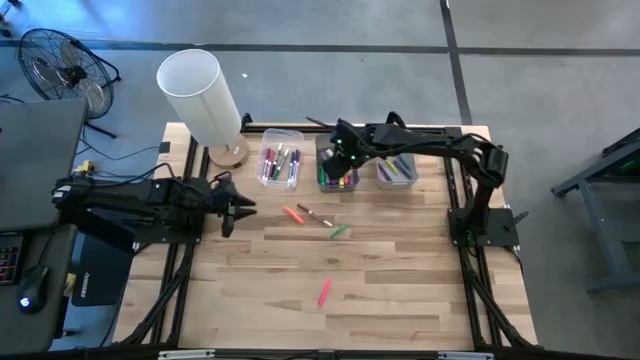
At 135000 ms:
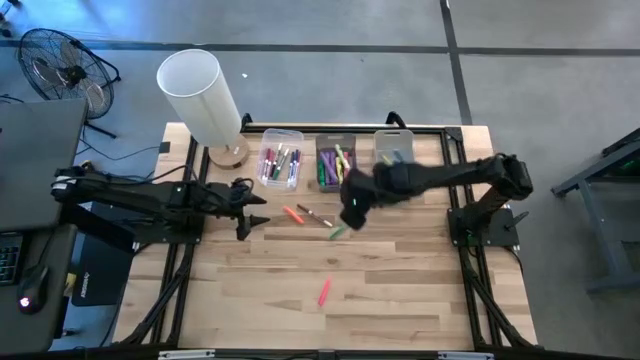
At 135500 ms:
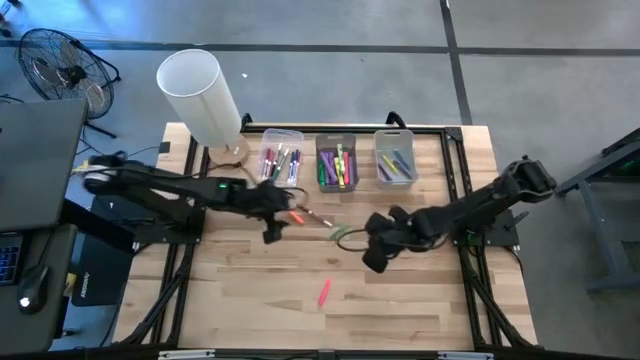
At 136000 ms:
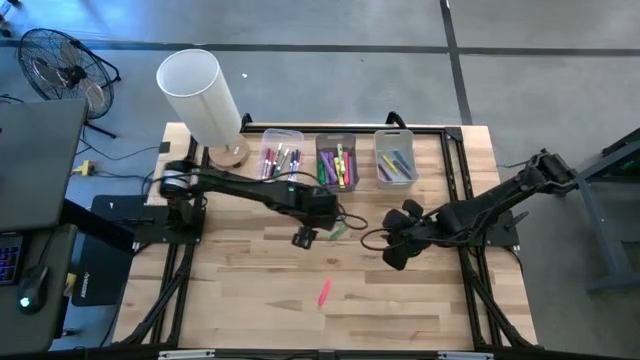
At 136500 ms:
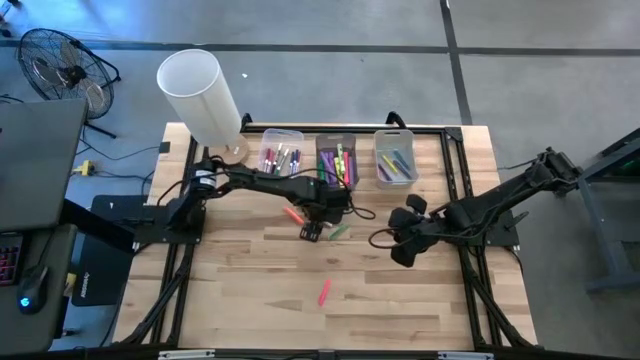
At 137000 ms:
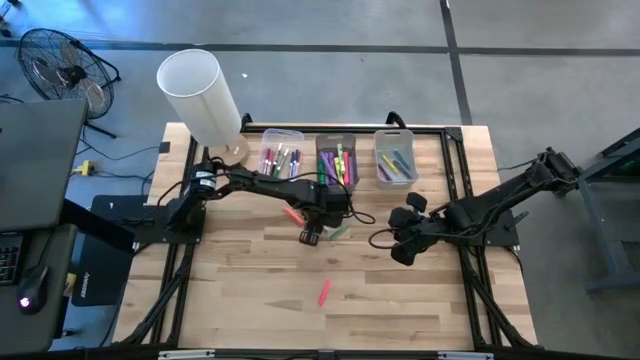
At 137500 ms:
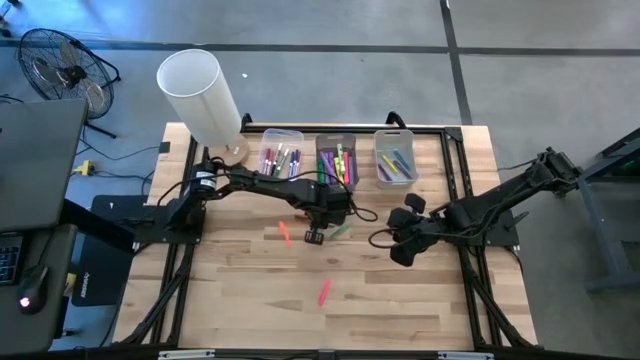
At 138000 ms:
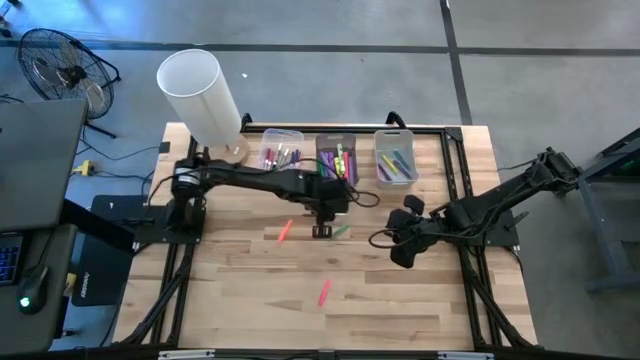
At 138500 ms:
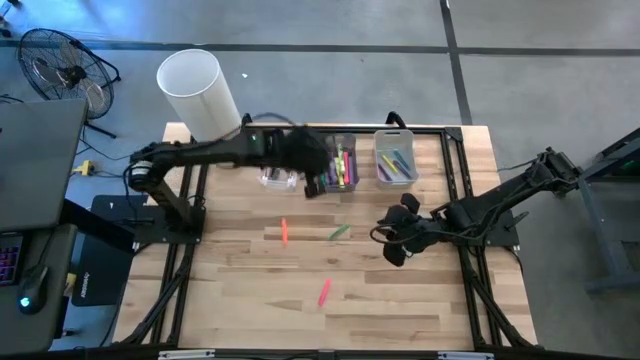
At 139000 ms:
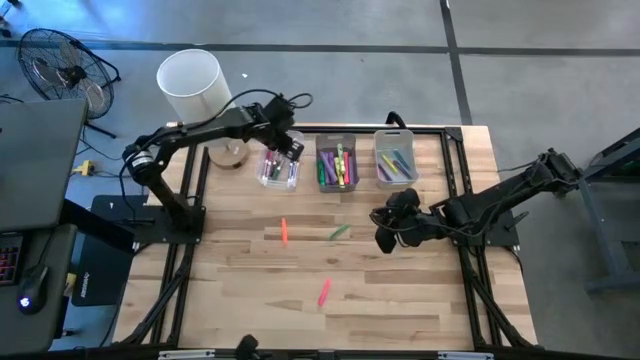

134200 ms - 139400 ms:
Task: Pick & Place Markers
Put the brown dry erase marker into the transparent bin

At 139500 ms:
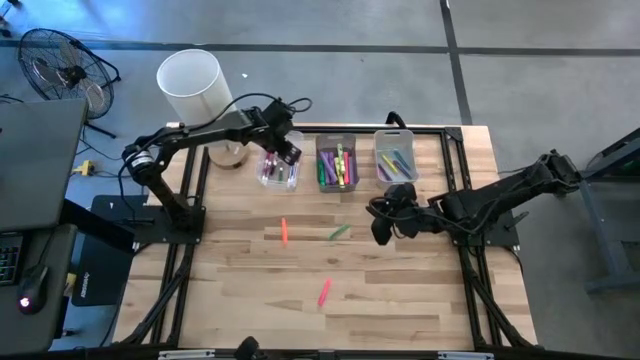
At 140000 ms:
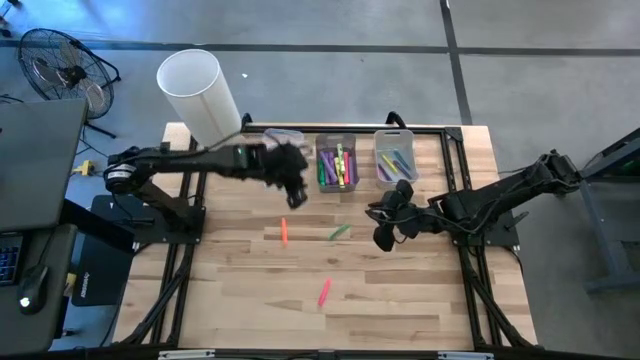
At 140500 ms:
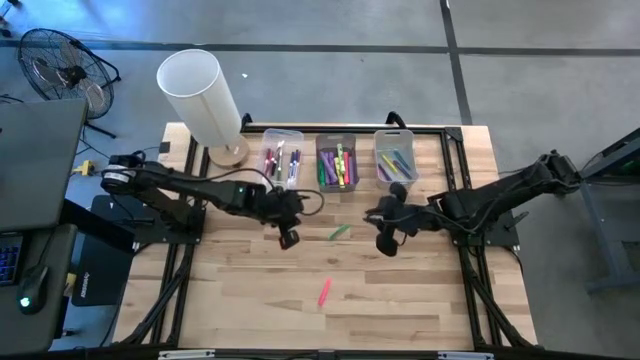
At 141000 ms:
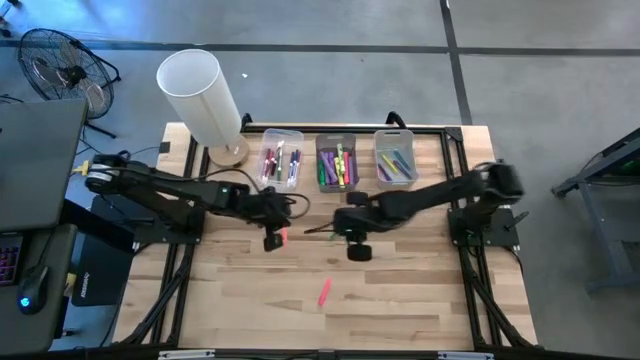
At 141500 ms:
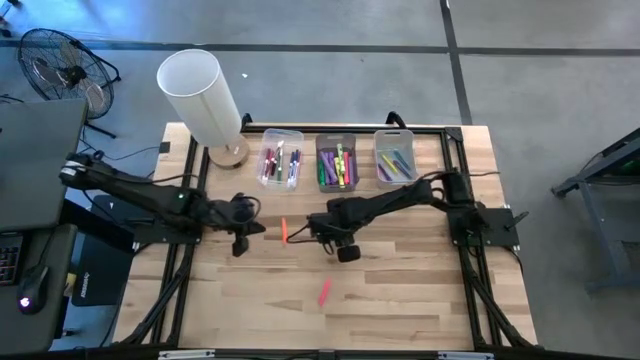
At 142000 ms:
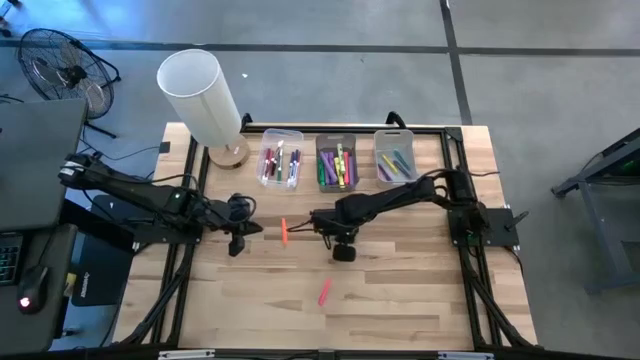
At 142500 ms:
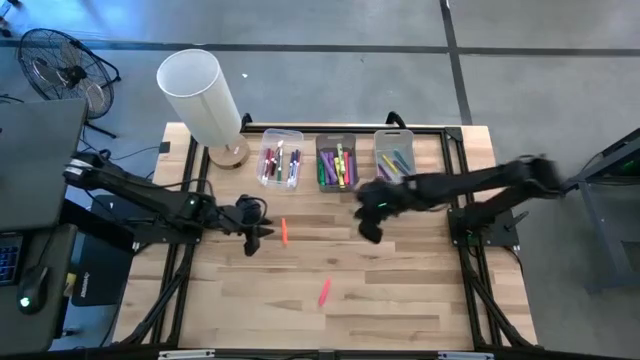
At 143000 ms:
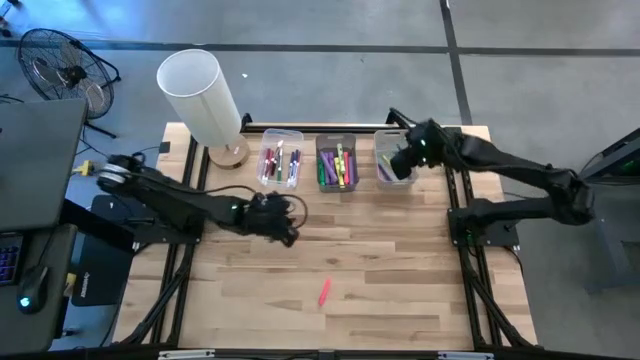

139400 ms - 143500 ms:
Put the green pen into the gray bin

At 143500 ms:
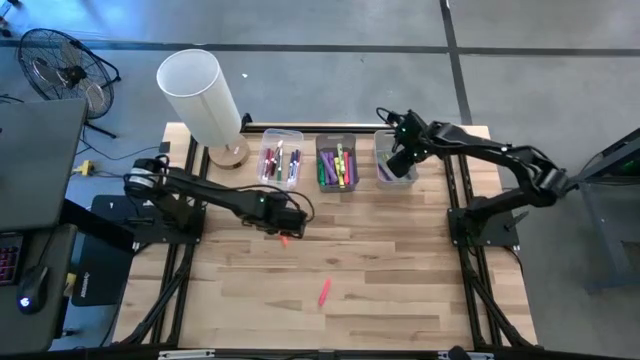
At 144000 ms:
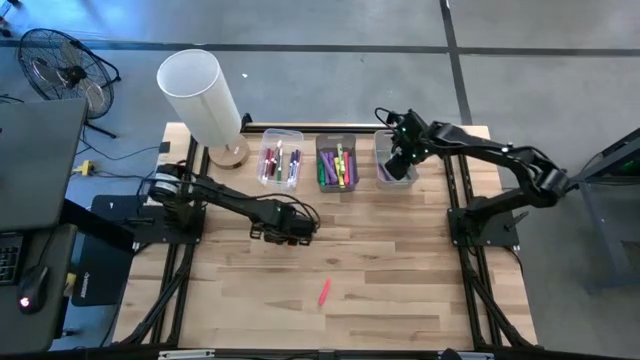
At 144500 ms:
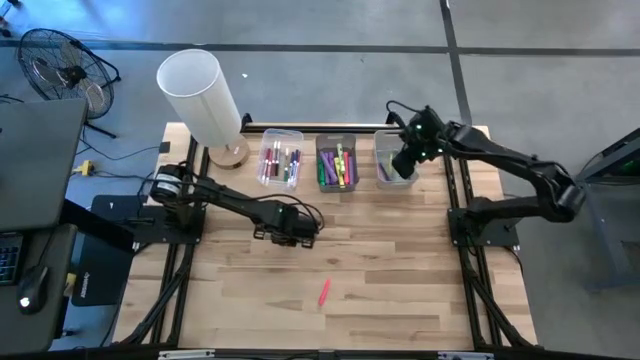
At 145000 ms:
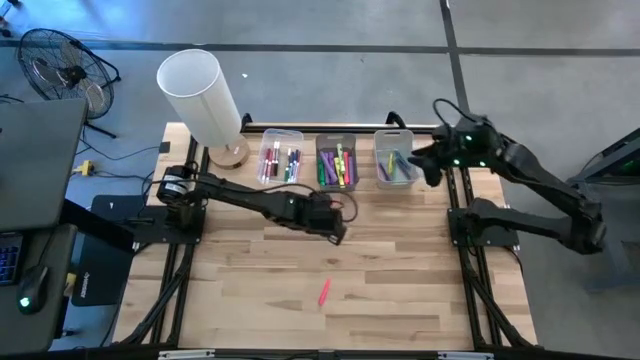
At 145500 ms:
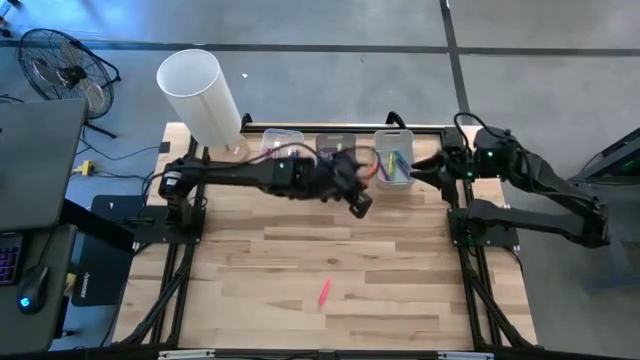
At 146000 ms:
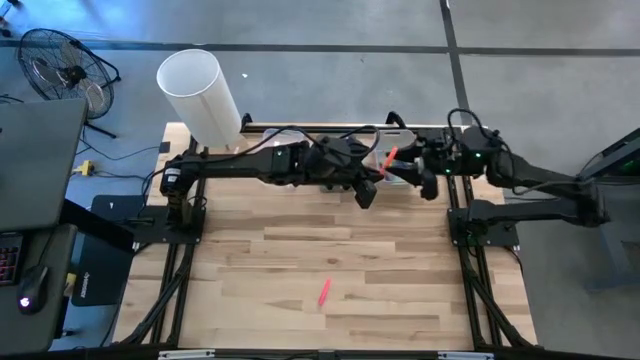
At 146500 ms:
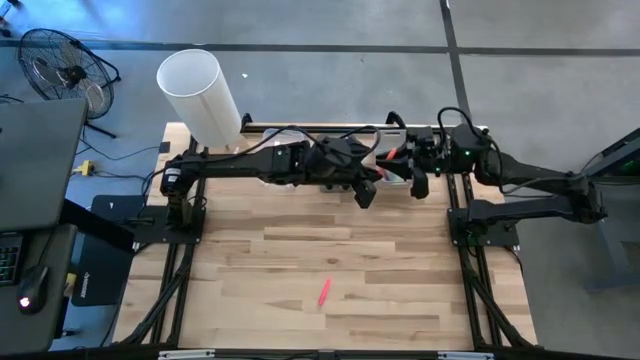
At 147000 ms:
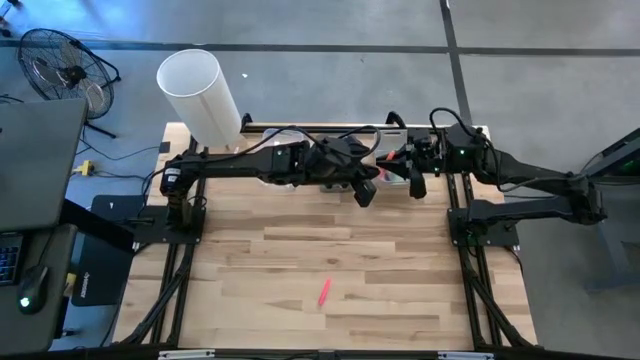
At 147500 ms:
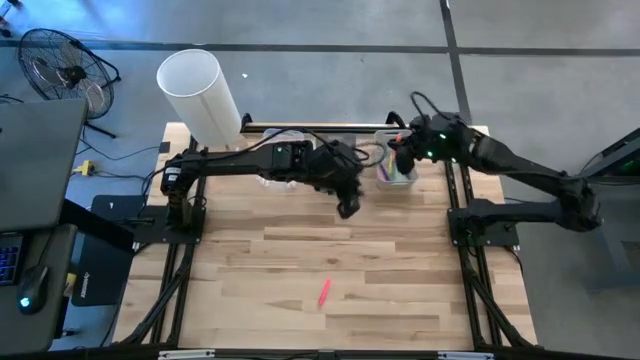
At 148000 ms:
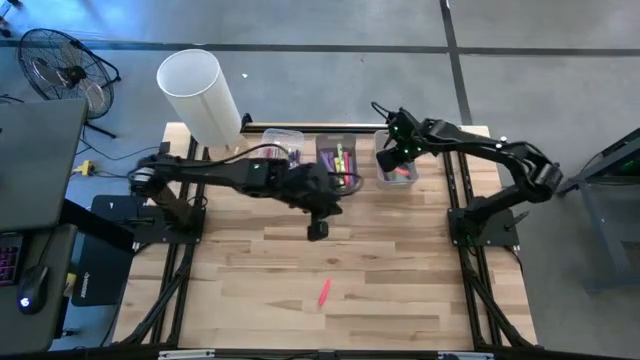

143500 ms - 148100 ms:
Put the orange pen into the gray bin

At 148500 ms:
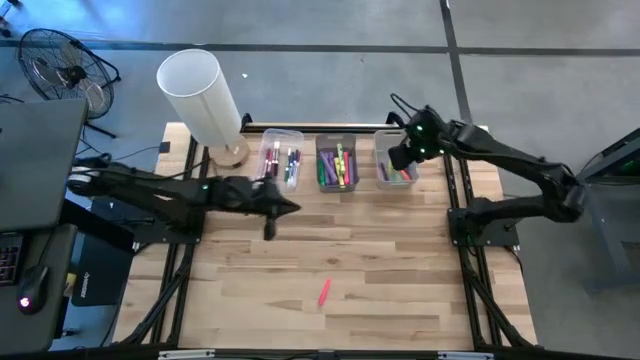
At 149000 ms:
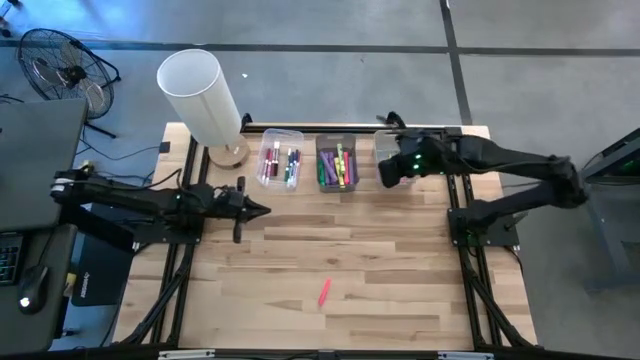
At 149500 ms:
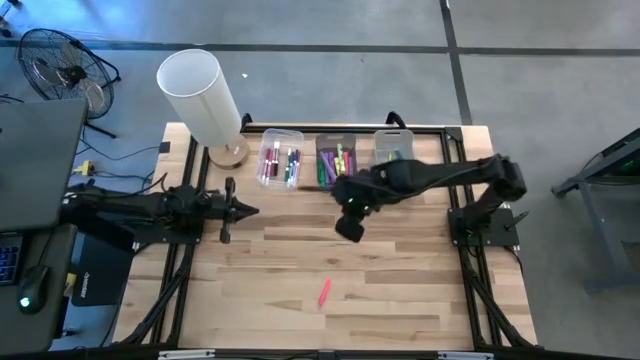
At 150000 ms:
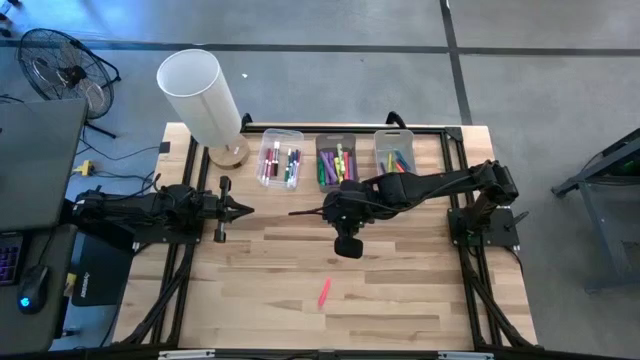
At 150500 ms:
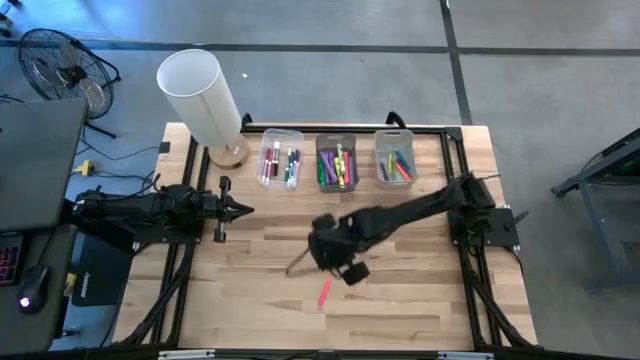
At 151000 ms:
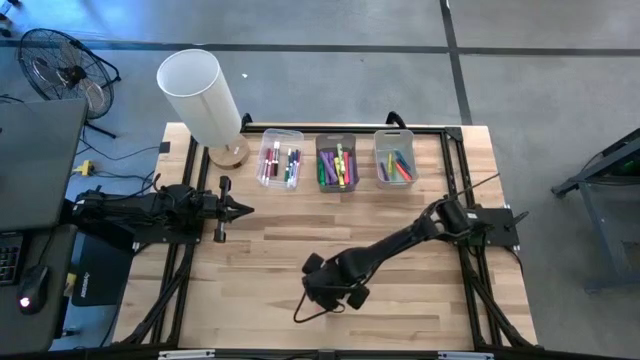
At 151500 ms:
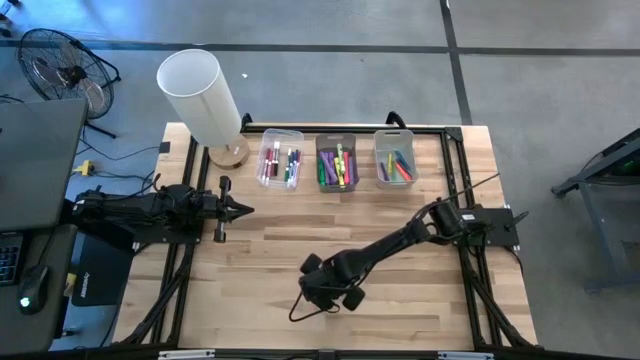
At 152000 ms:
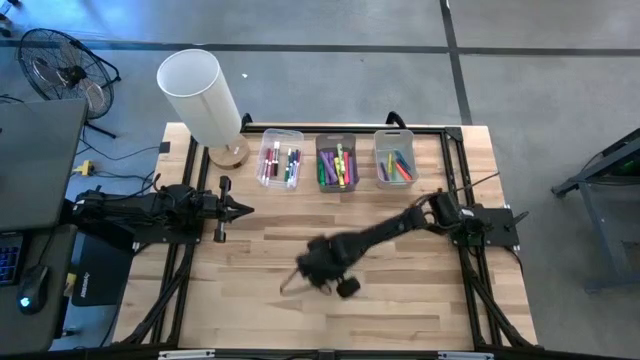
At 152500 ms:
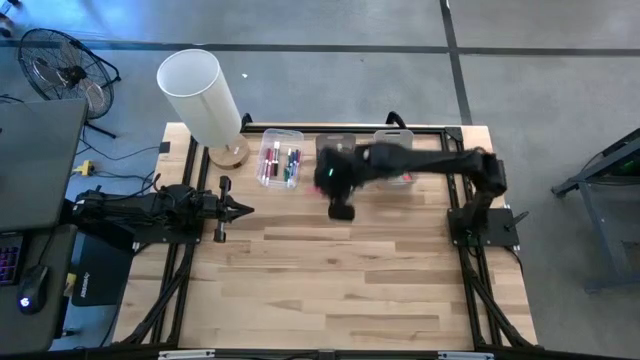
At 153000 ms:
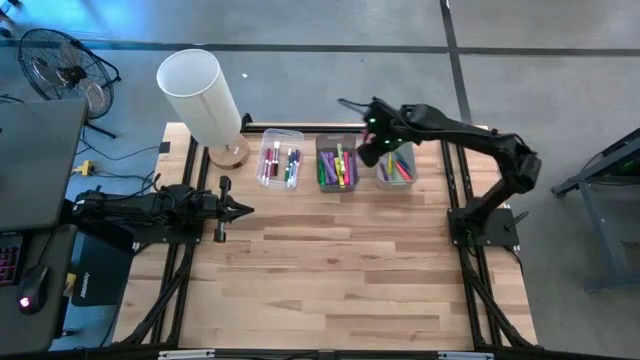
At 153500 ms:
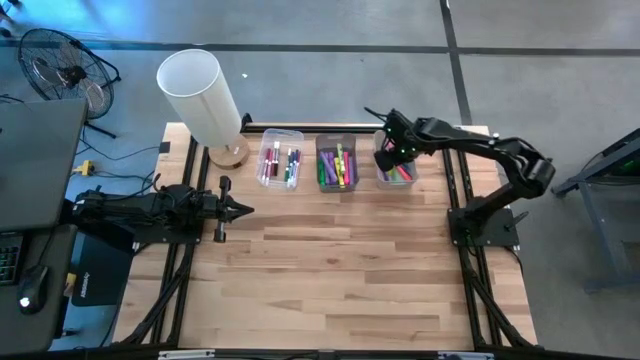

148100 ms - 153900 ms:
Put the pink pen into the gray bin
